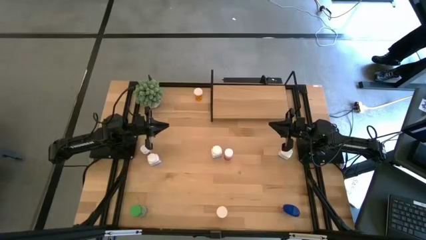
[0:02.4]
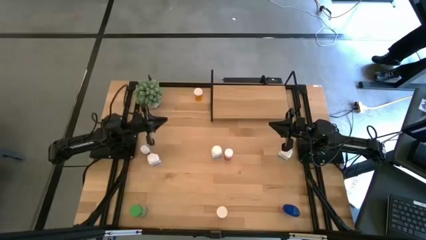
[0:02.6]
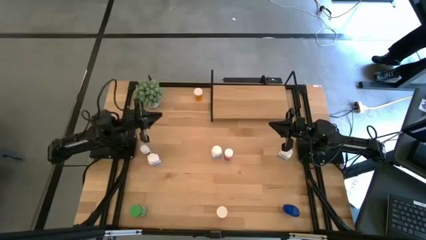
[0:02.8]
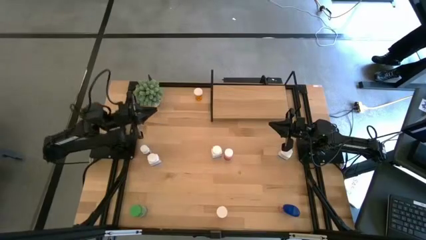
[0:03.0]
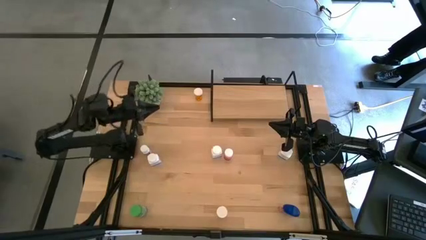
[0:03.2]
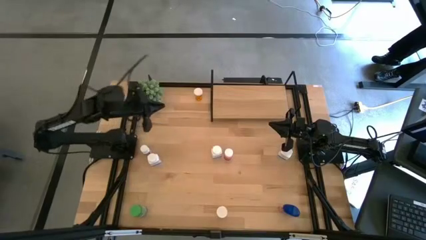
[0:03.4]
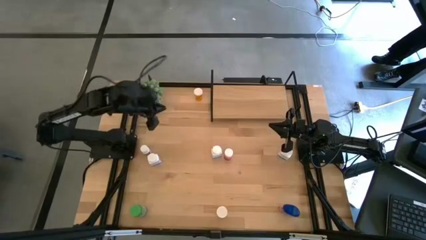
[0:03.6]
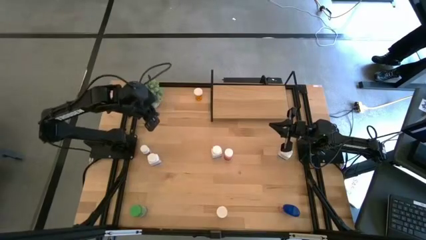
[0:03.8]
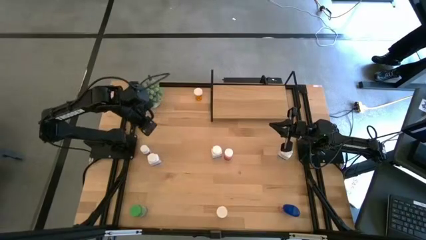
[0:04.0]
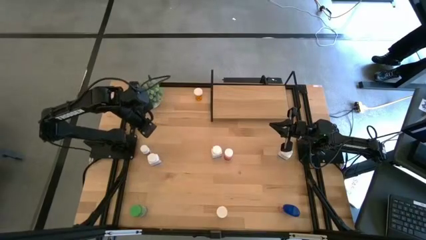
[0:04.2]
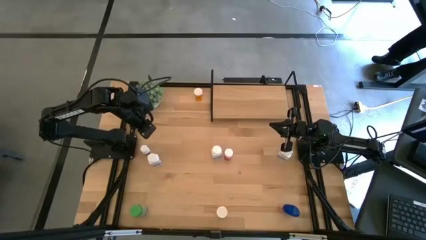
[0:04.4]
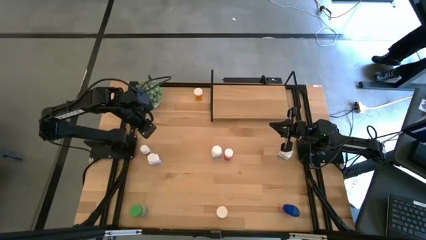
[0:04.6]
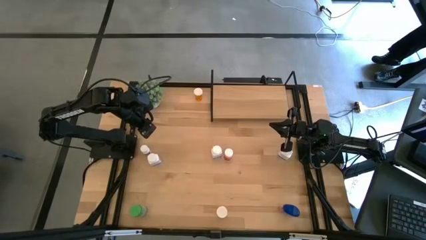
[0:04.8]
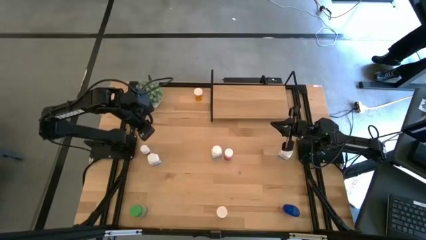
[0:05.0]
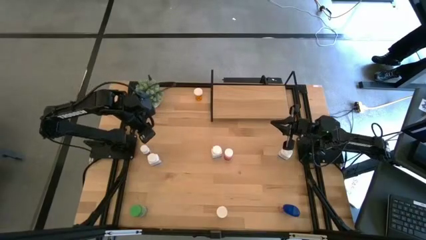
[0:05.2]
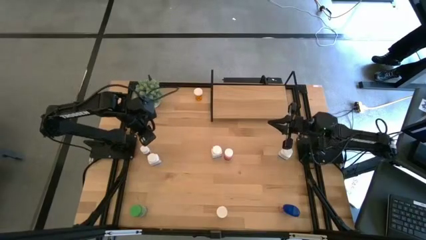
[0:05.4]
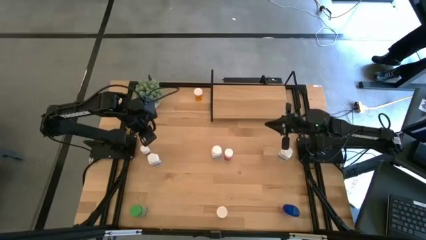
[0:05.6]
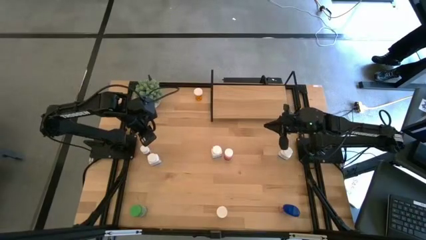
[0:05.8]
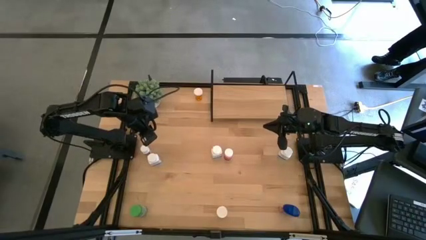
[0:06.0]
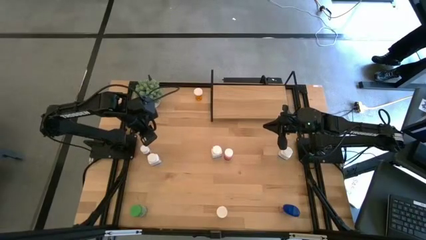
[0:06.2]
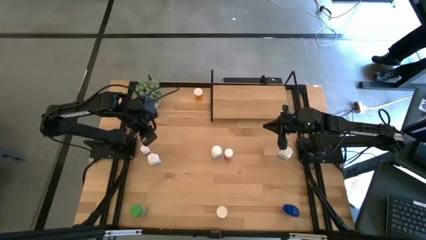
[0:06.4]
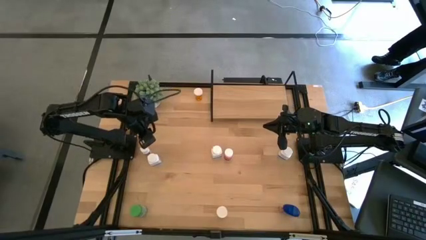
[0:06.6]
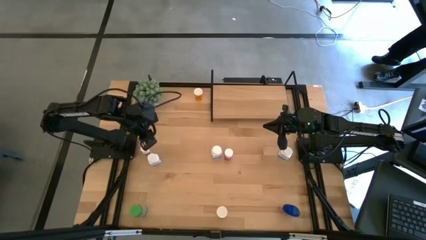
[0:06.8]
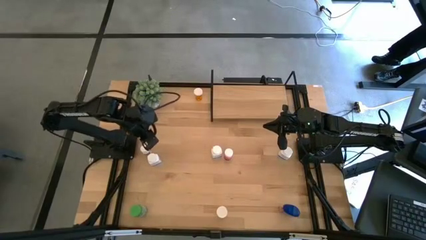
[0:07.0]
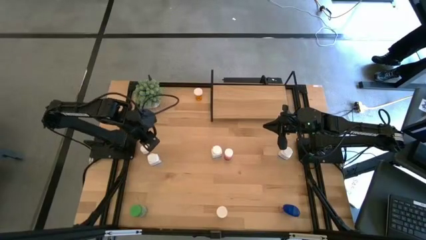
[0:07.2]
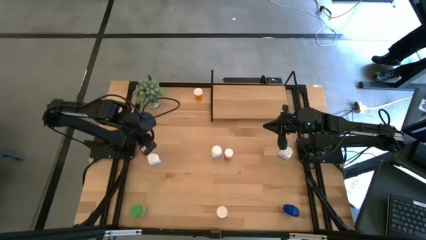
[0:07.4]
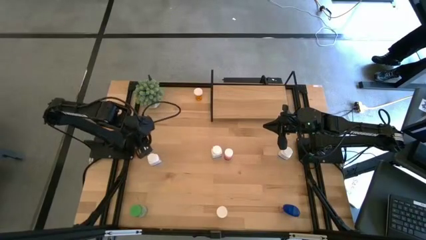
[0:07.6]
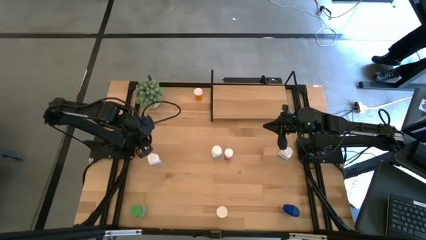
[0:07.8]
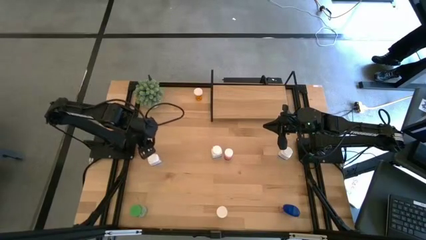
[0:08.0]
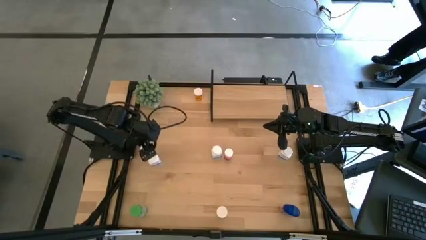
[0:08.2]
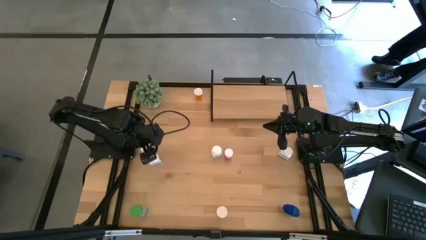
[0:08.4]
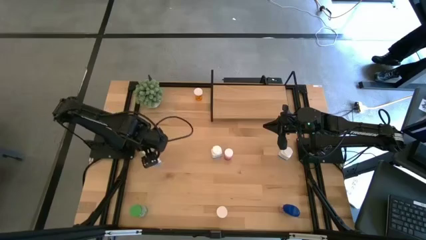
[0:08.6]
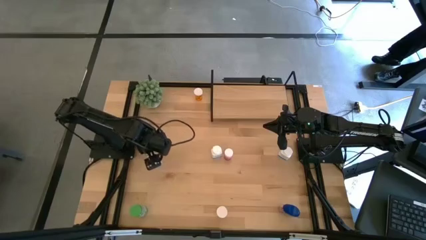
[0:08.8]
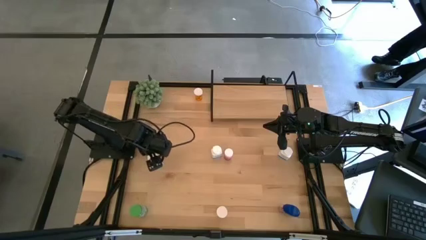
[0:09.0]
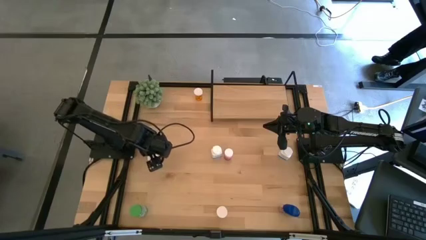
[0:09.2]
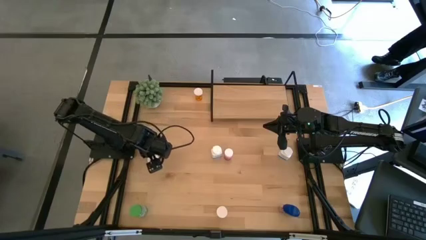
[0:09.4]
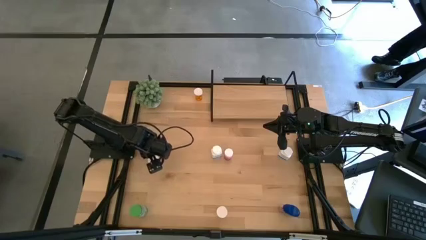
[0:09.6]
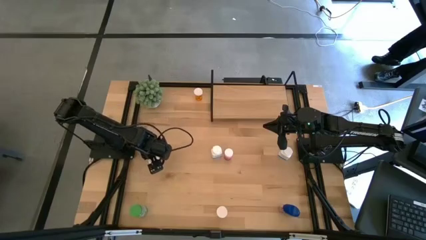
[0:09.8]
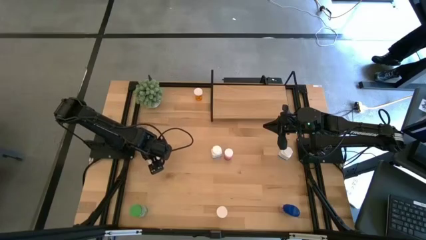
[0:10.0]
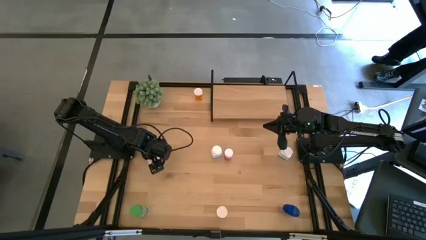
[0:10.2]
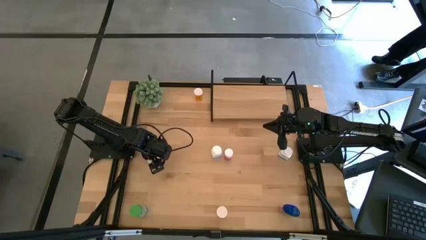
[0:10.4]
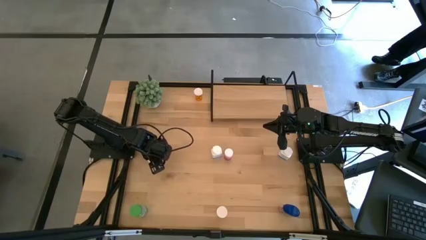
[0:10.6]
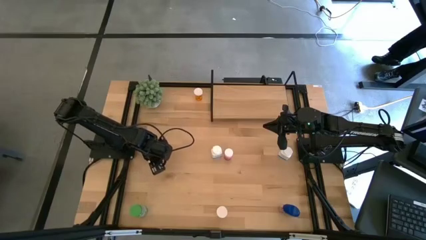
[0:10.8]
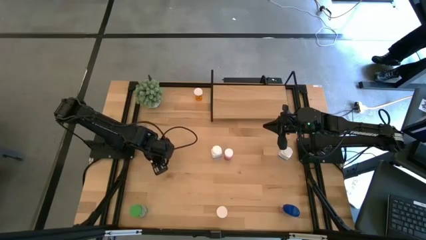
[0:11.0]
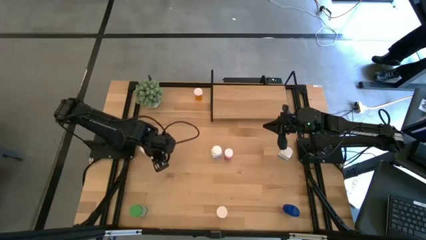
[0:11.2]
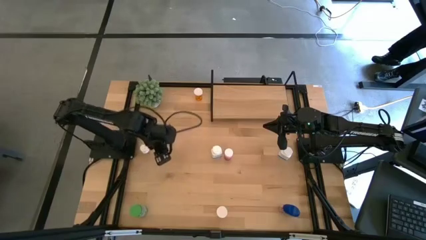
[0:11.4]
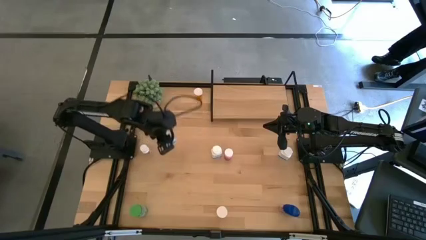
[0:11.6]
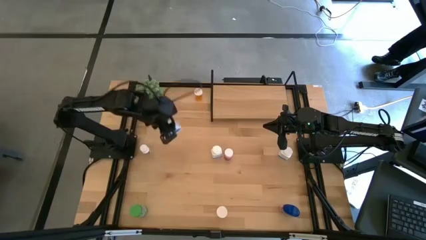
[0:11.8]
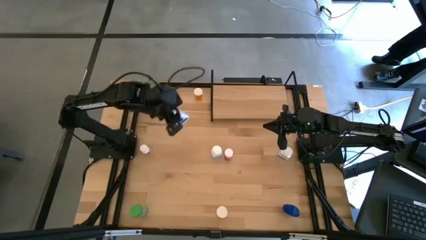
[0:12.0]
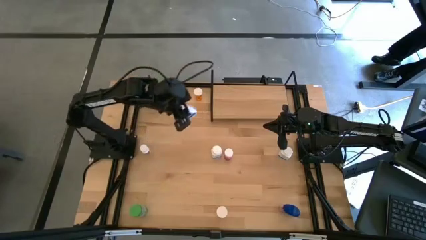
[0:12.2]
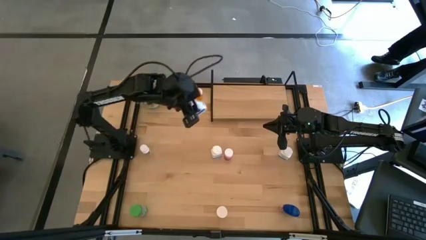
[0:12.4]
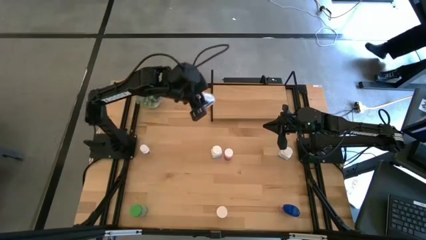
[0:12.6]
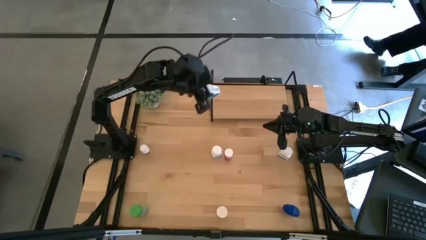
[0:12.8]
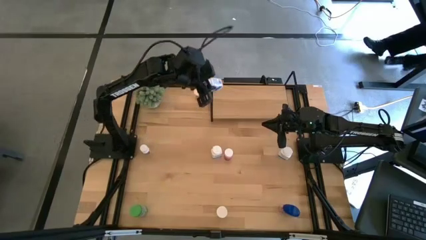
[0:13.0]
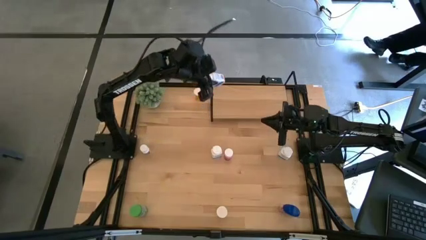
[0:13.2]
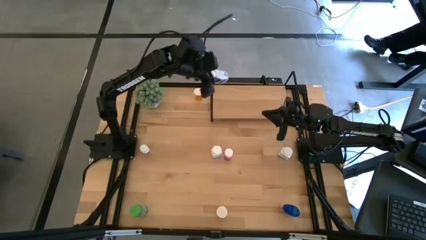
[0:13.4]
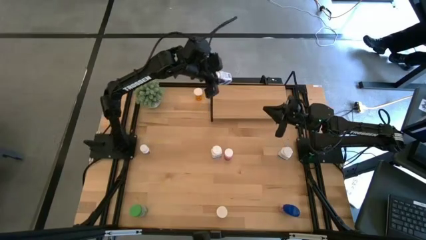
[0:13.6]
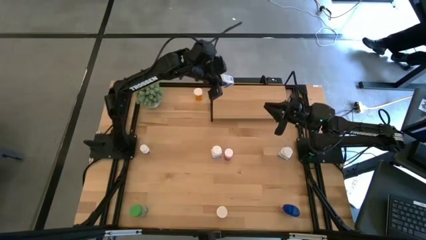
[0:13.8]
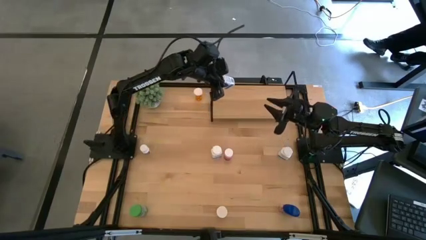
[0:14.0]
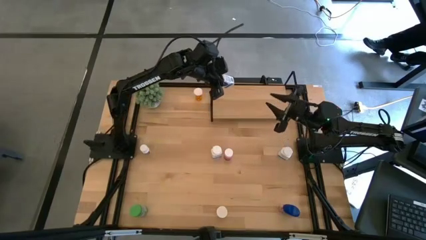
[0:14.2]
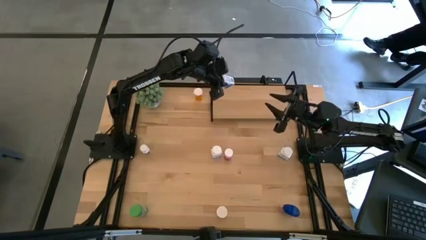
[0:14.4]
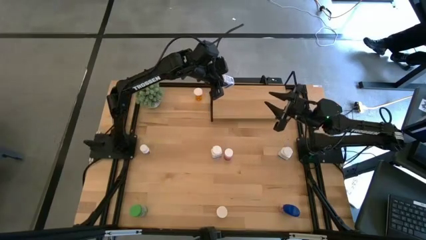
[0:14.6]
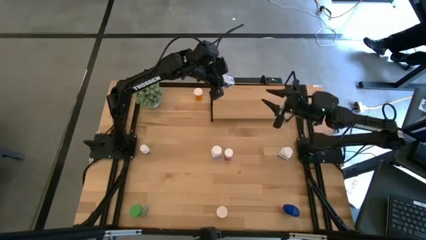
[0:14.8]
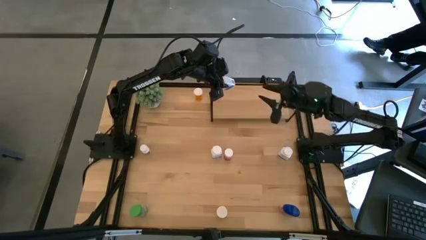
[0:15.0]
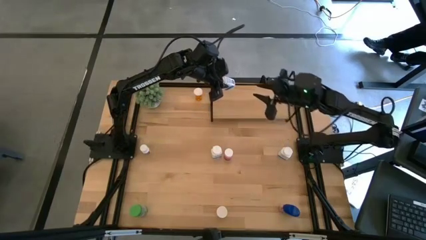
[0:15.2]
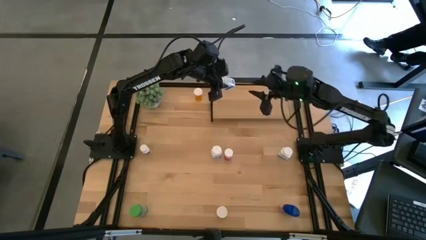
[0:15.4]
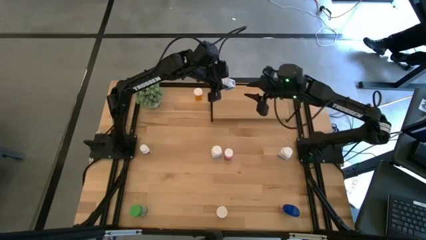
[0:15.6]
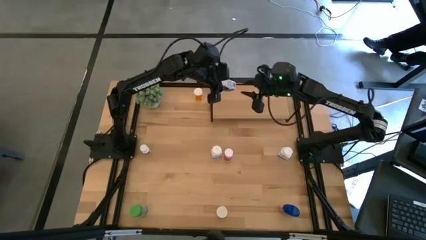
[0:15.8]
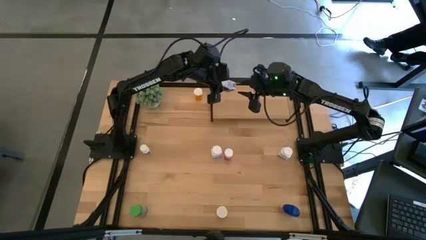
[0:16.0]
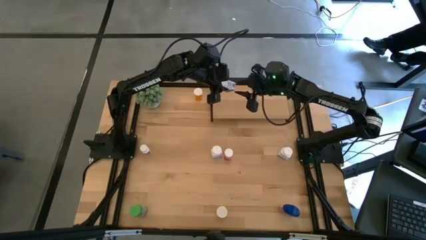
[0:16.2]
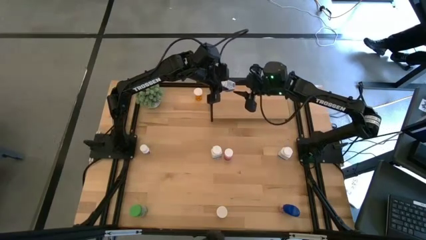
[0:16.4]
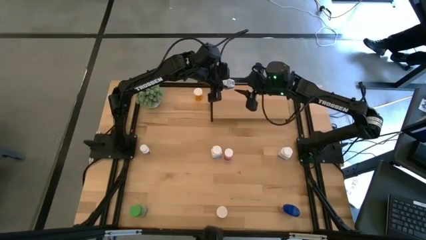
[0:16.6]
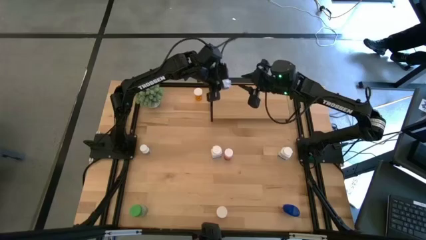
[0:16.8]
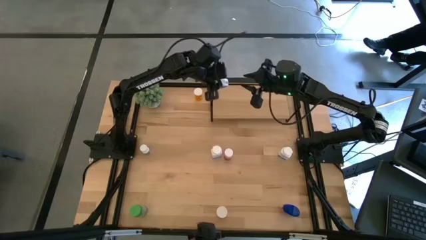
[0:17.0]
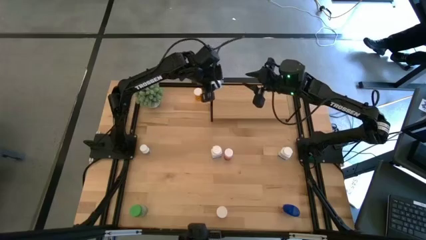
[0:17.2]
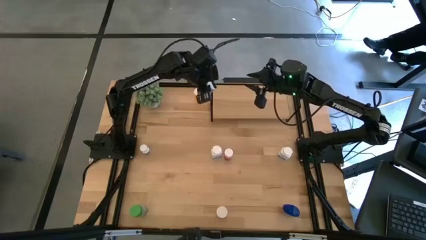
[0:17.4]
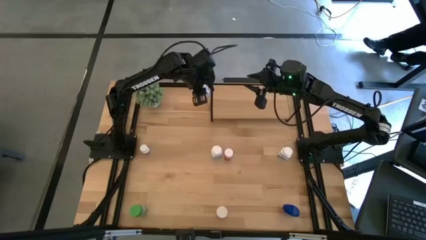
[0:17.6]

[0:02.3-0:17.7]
Task: Pick and place medicine bottles onto shelf by color
Put the white medicine bottle on the shelf
